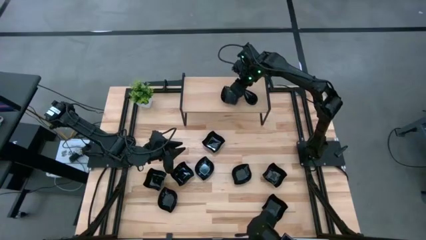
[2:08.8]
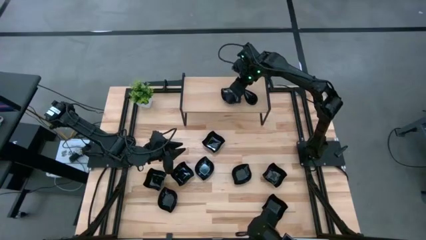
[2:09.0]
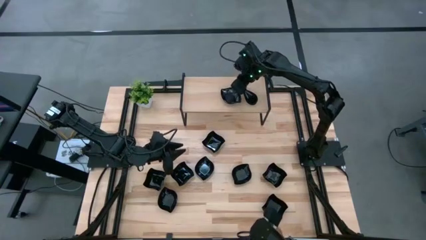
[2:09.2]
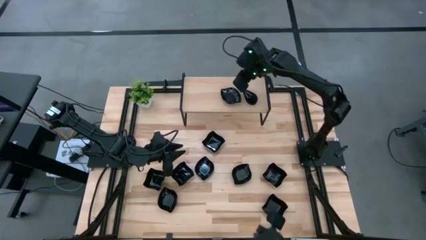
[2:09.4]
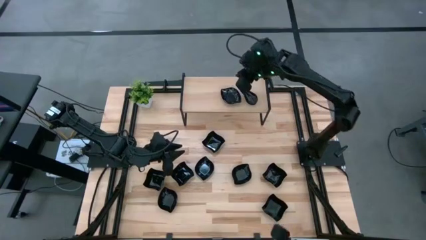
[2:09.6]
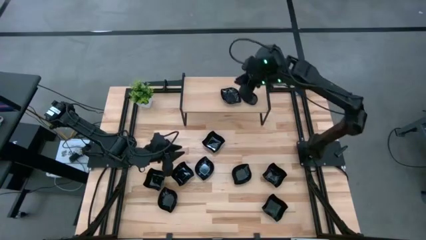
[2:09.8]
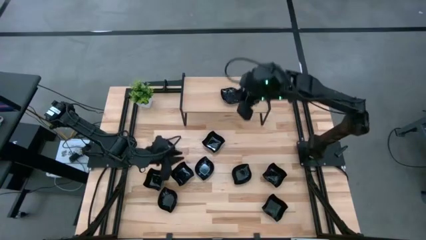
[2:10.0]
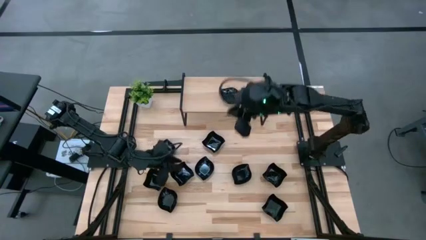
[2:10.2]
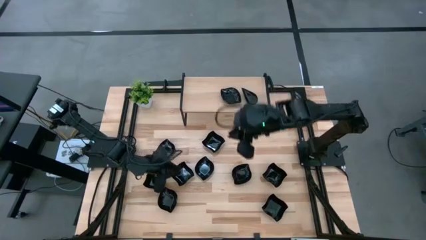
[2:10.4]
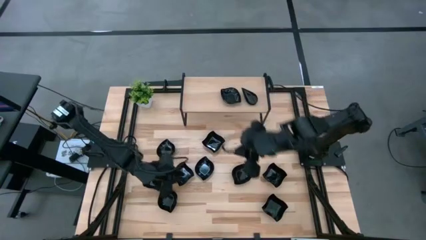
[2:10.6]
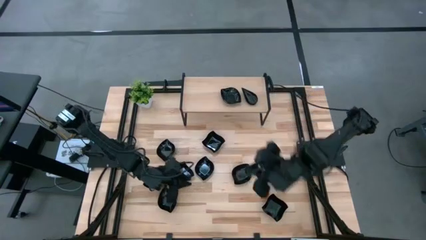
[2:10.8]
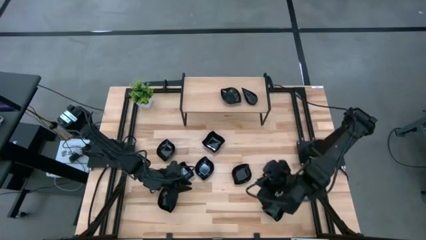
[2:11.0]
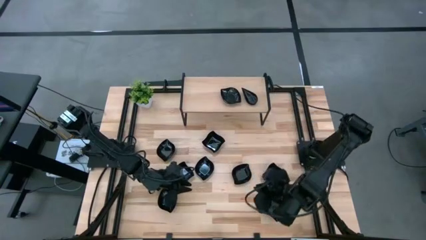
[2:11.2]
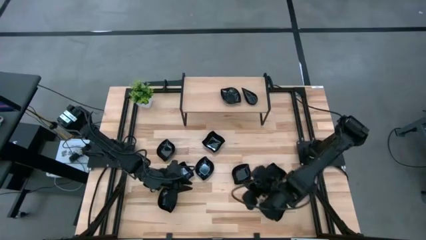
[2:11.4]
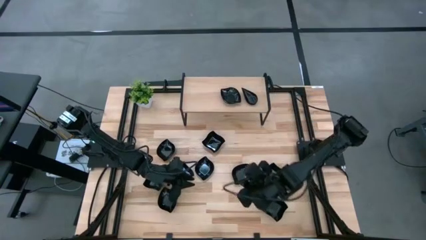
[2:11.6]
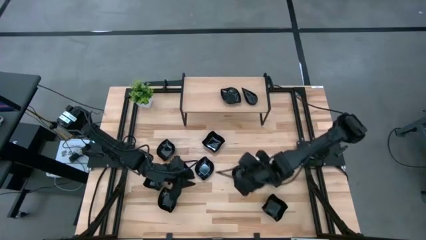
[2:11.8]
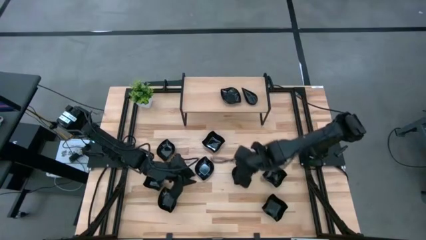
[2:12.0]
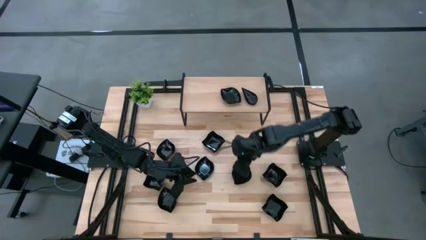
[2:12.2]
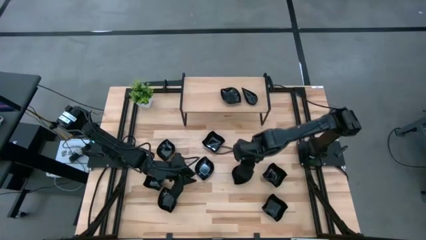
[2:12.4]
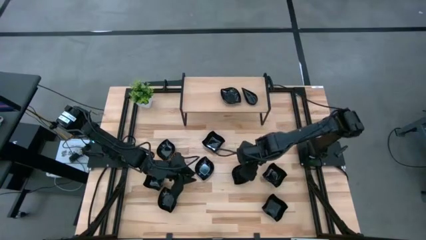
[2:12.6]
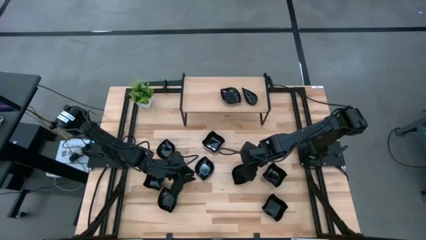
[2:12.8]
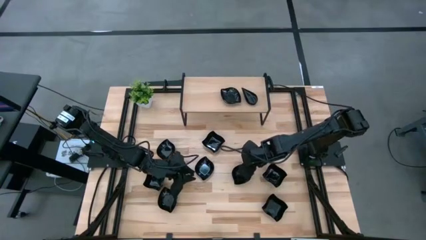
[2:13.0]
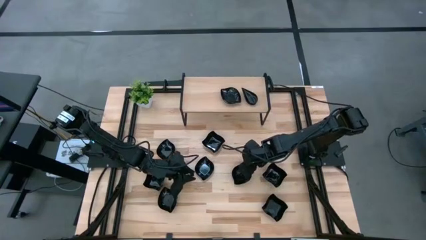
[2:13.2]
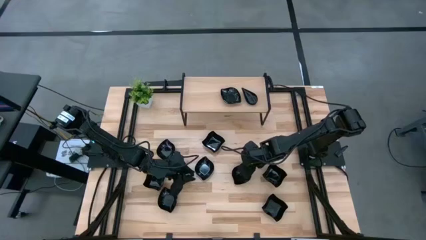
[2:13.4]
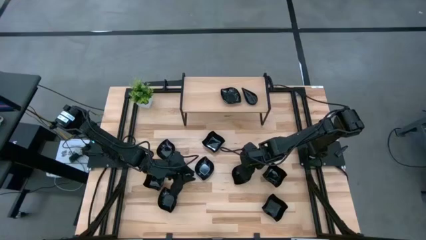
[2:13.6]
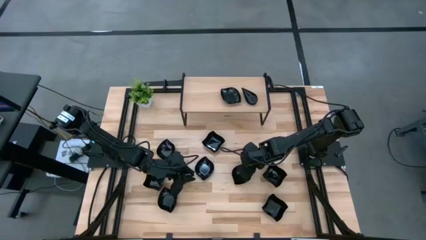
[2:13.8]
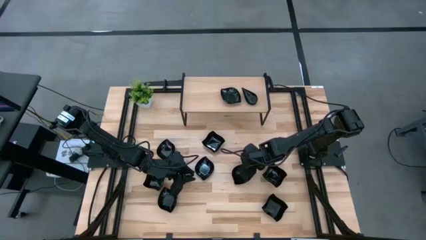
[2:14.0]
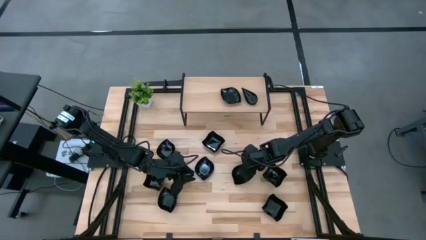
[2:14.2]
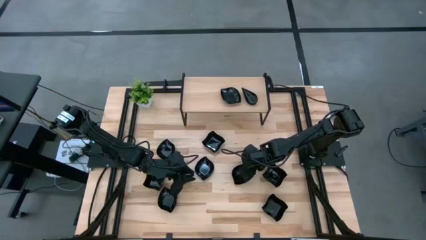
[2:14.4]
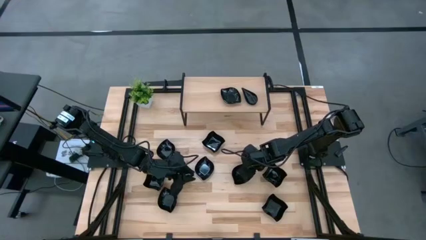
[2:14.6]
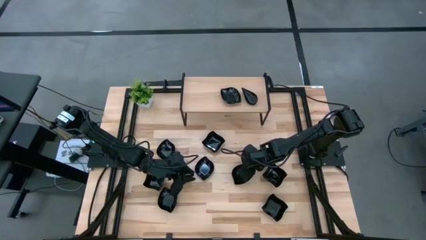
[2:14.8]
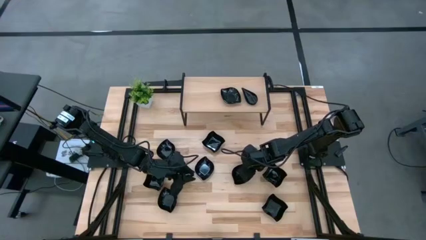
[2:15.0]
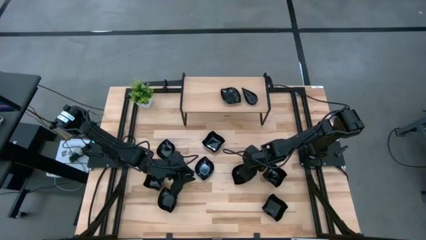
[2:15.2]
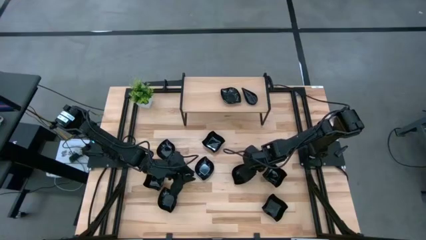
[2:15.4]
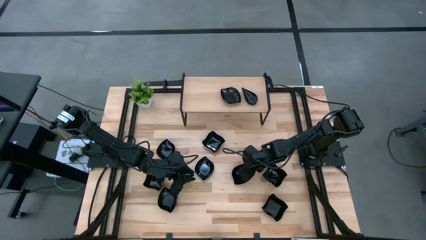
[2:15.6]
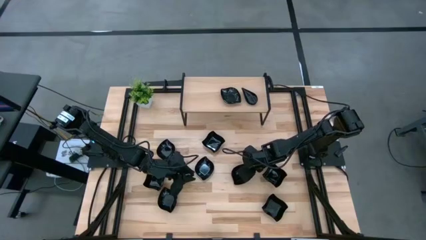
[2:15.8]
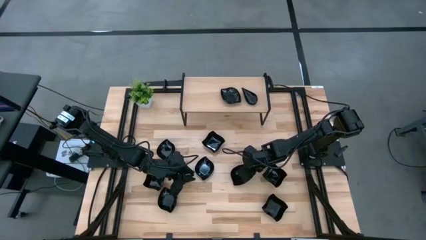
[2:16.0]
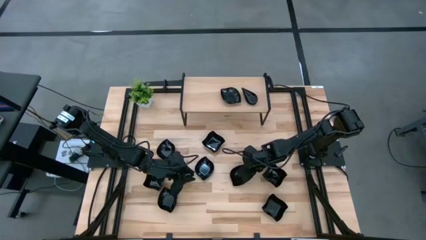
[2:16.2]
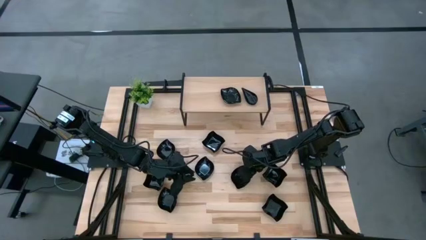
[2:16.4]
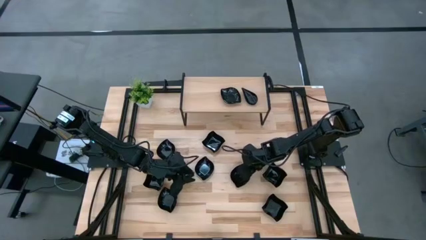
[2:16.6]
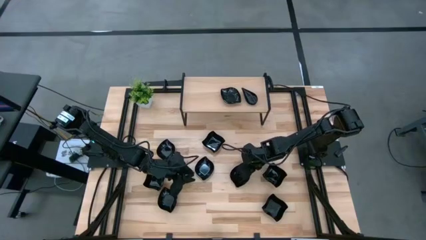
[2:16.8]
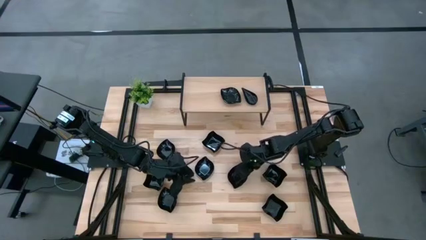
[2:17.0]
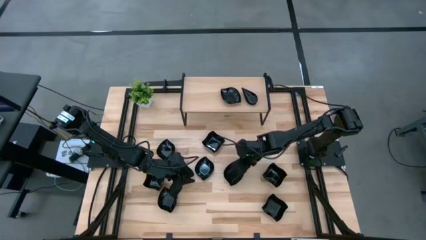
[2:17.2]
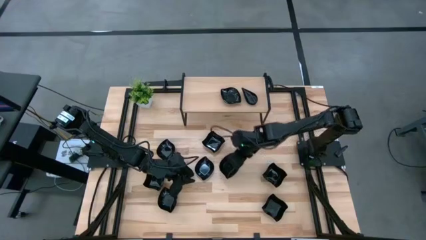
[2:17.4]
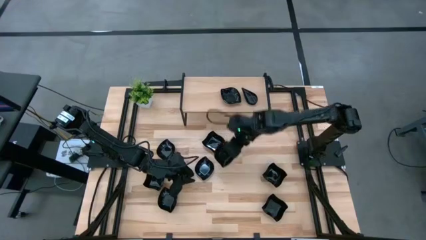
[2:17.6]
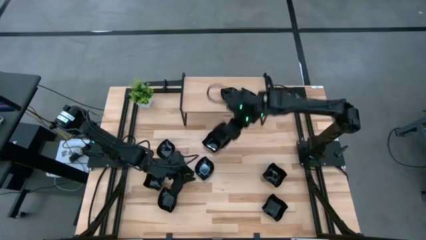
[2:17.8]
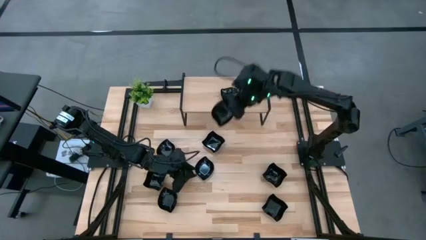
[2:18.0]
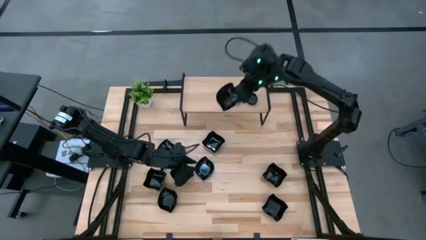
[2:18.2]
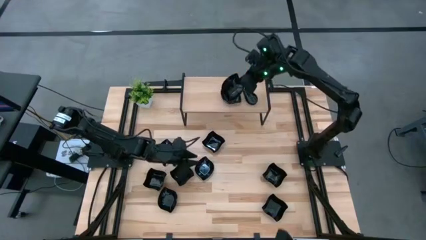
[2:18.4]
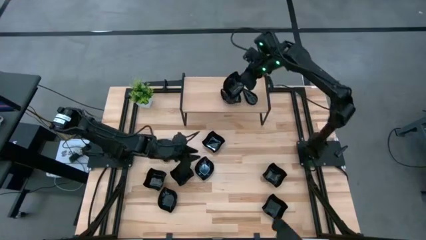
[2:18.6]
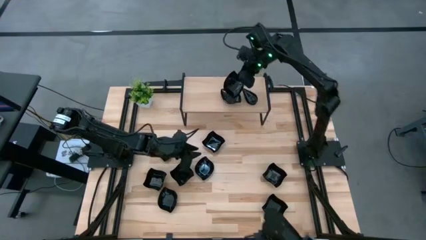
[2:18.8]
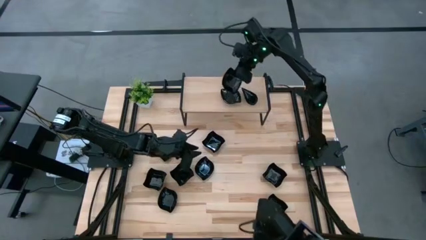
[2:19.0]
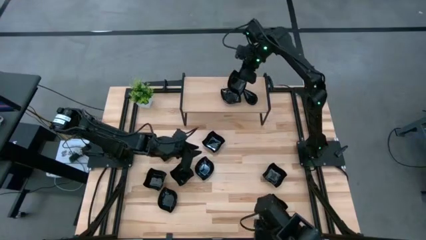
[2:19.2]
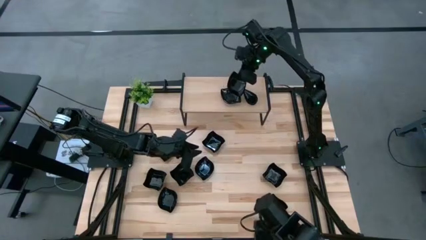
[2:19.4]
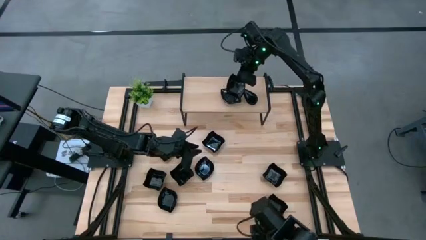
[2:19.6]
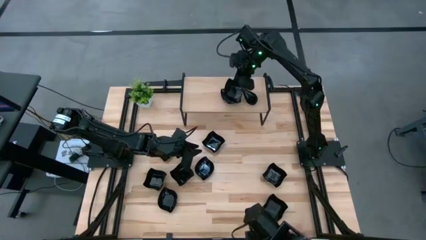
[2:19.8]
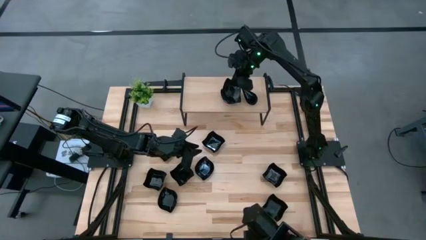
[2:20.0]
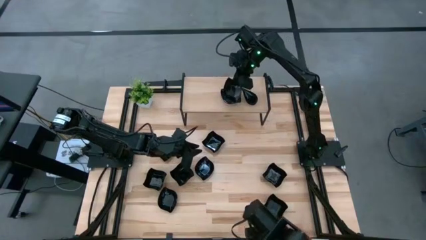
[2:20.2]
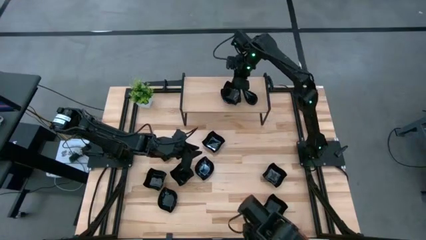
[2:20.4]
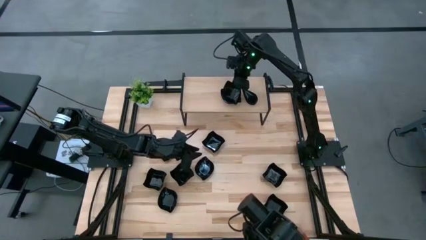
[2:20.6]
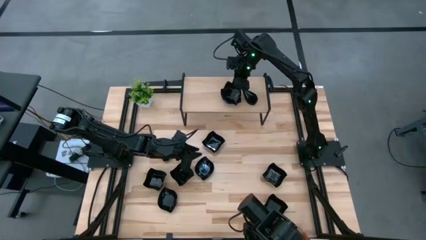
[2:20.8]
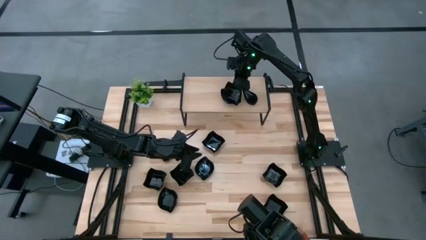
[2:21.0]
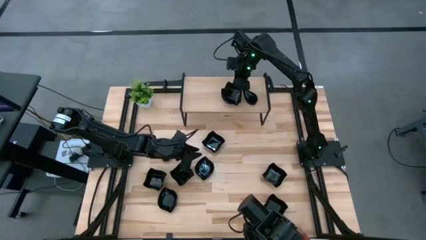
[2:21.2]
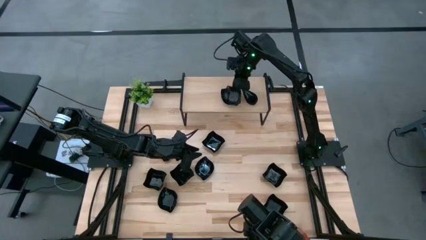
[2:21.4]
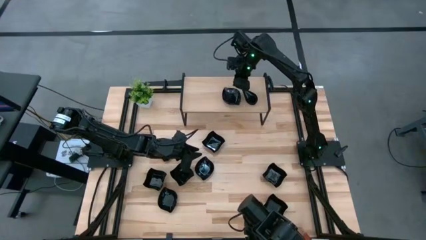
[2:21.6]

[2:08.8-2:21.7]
Task: Pick & Place Mini shaped plates
Stack the black leaf shaped plate on top of the black leaf shaped plate on the shelf
